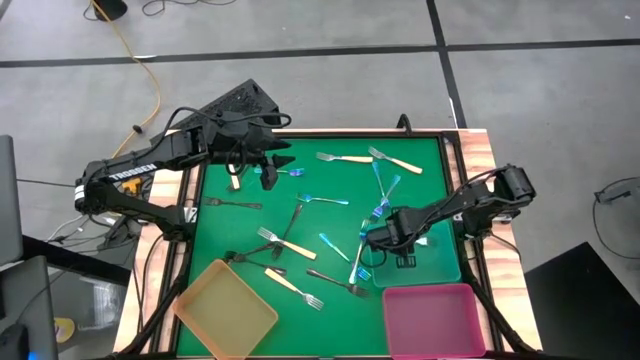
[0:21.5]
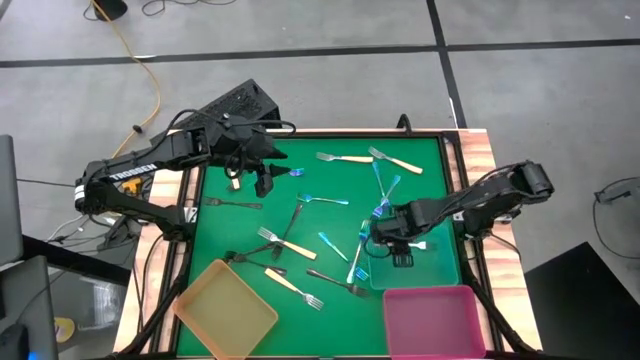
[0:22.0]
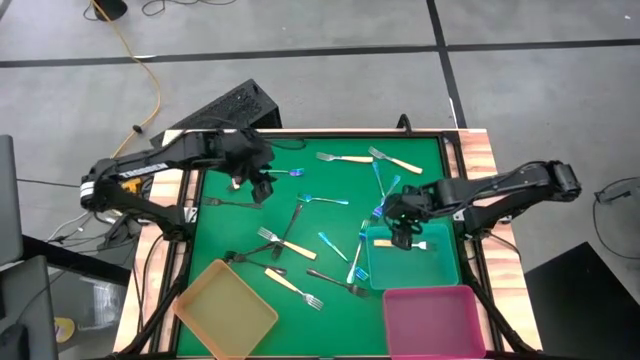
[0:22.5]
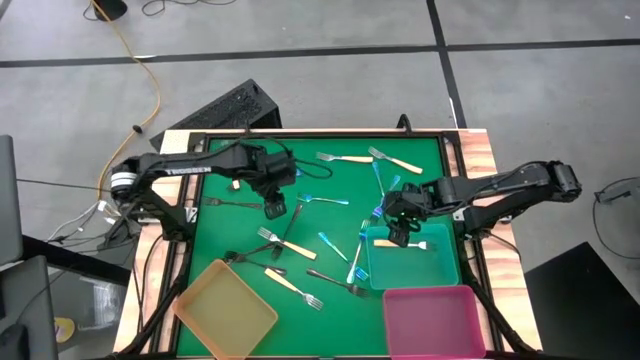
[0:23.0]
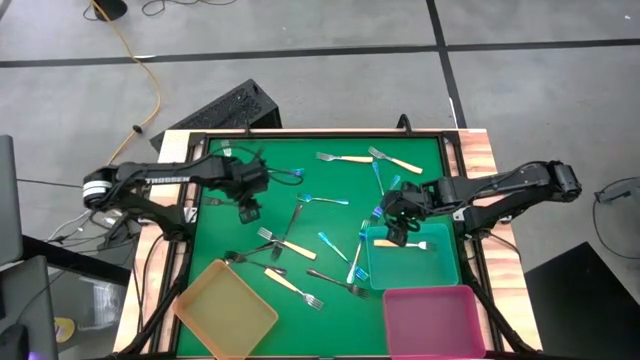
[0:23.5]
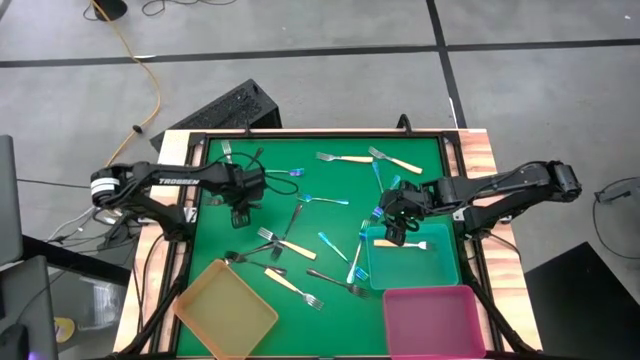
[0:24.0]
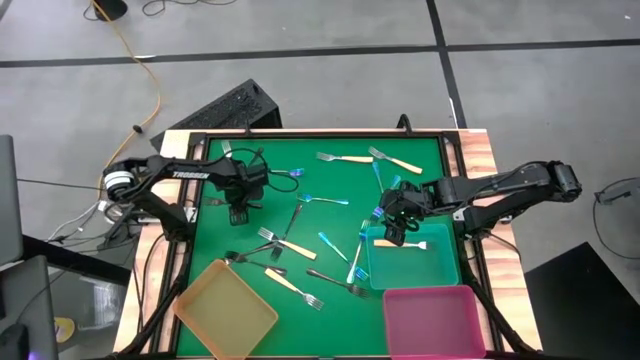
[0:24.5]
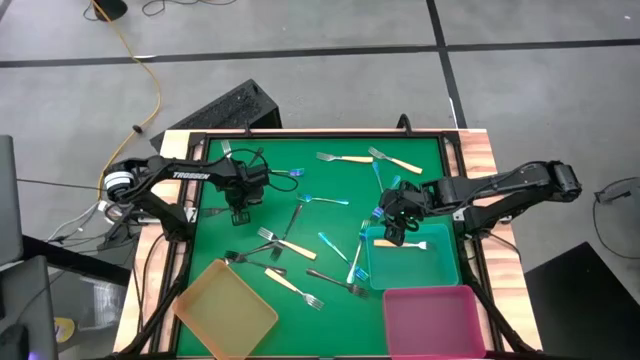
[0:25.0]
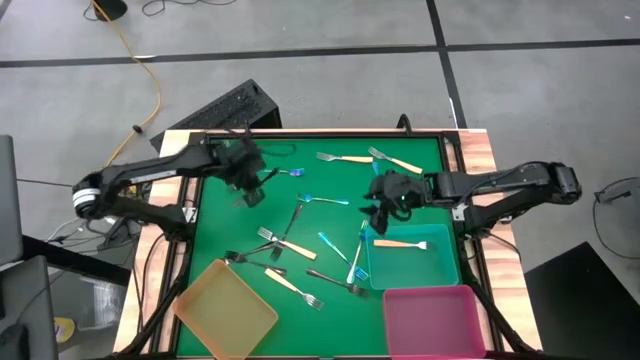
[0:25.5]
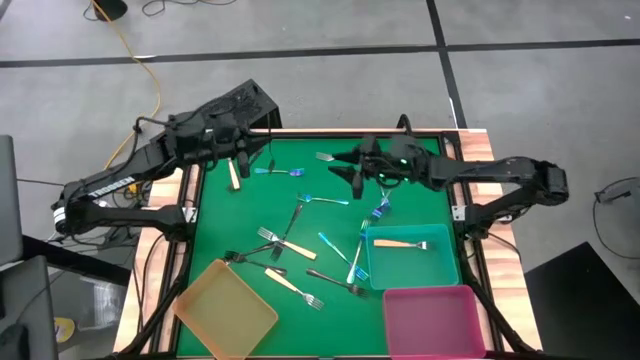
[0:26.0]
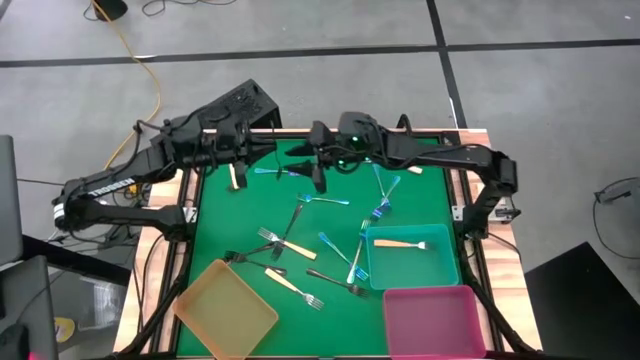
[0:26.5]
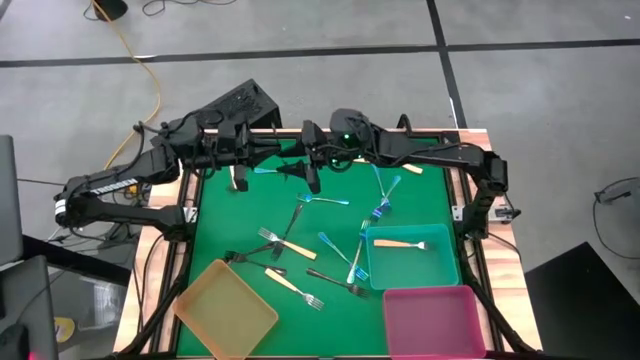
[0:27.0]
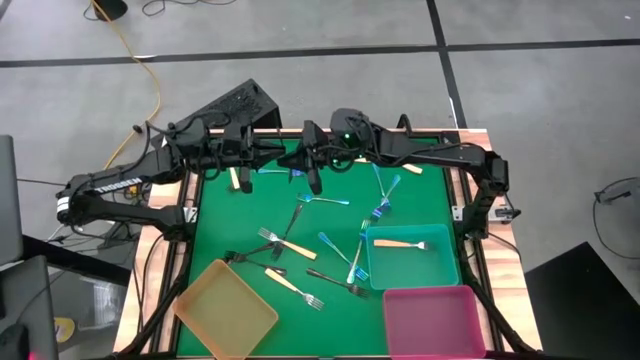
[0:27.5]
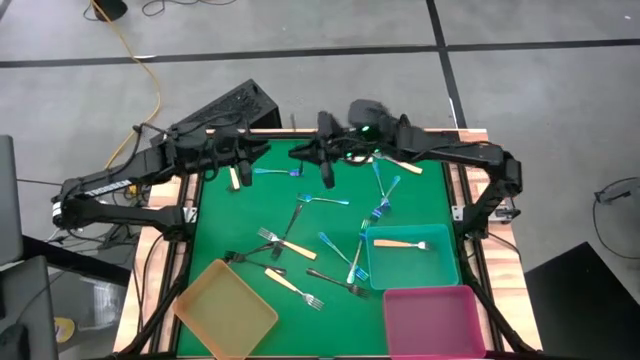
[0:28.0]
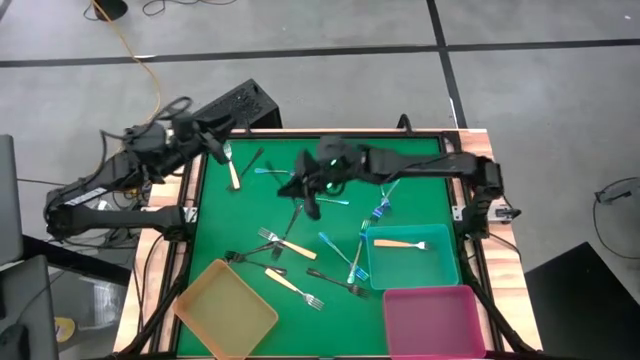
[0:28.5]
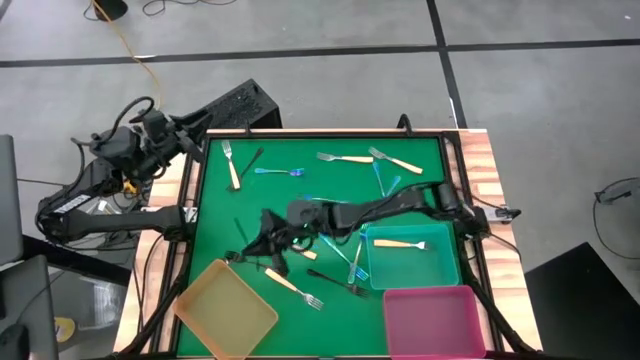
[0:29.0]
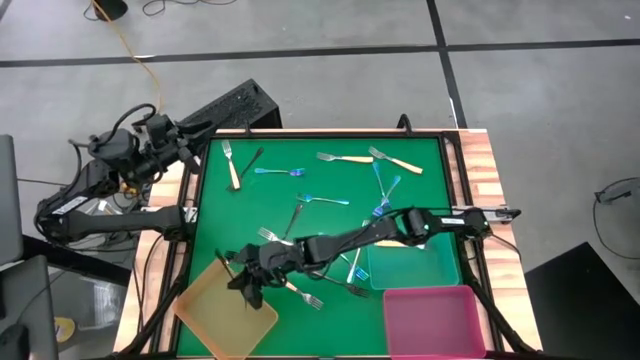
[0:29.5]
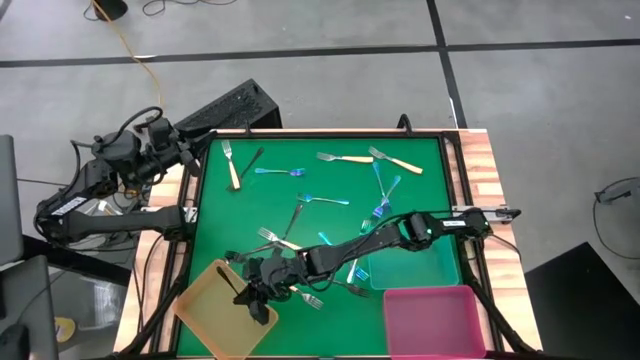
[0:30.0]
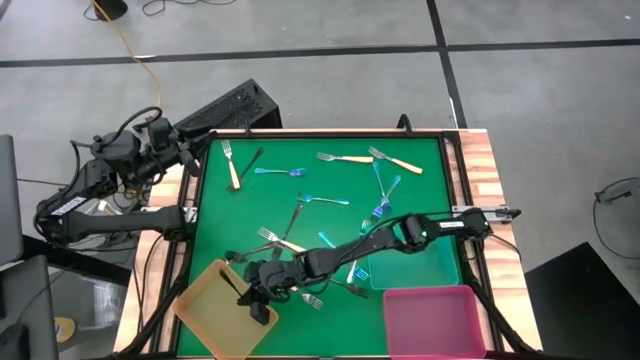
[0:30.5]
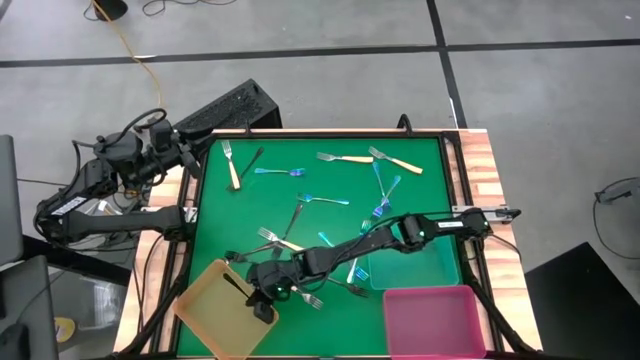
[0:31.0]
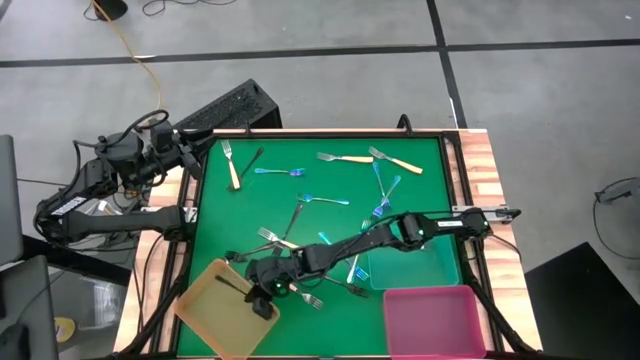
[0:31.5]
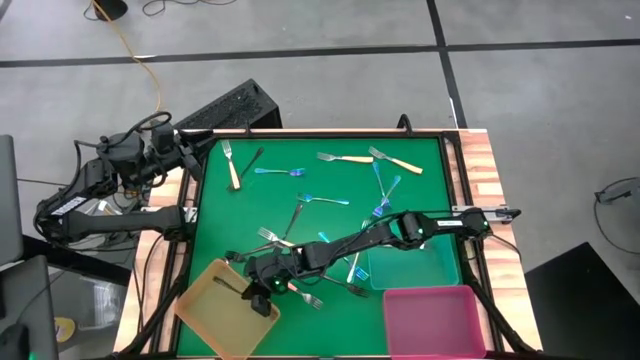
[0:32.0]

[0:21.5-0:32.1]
Task: Sort silverware by color (type)
Put the black fork into the orange bin

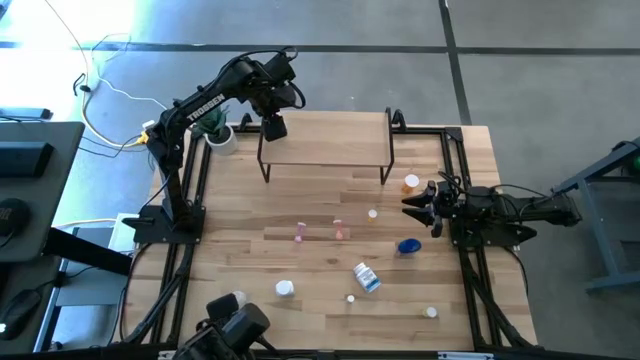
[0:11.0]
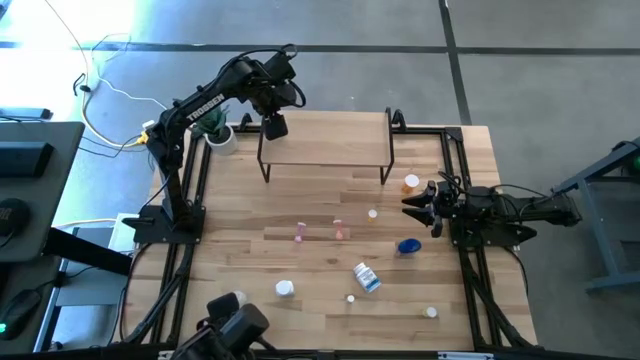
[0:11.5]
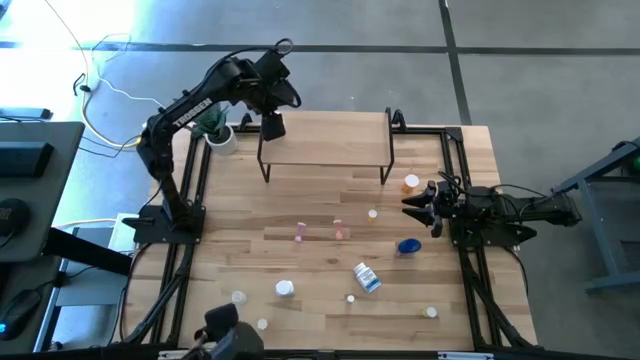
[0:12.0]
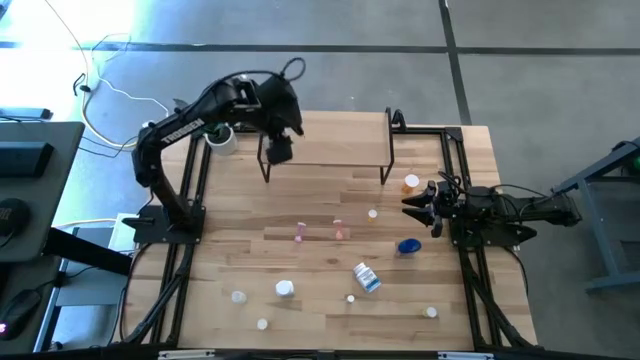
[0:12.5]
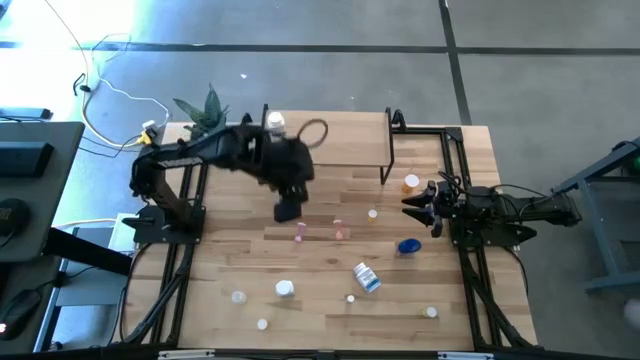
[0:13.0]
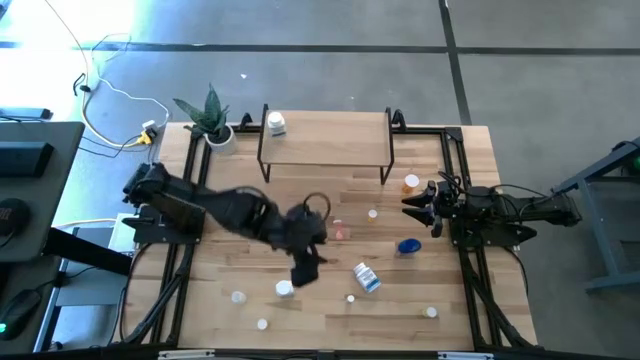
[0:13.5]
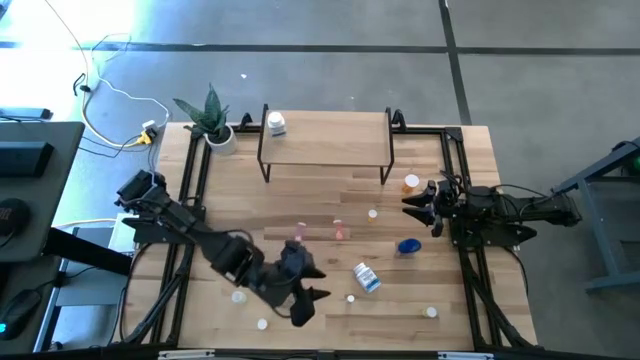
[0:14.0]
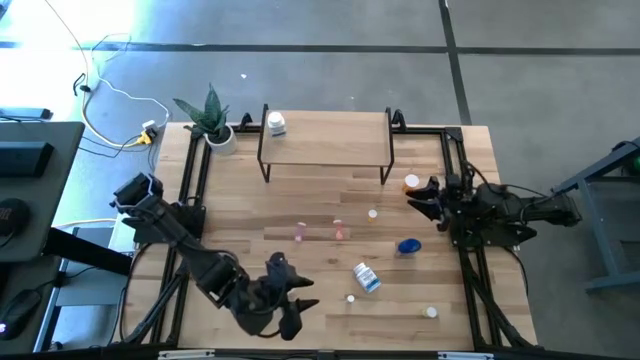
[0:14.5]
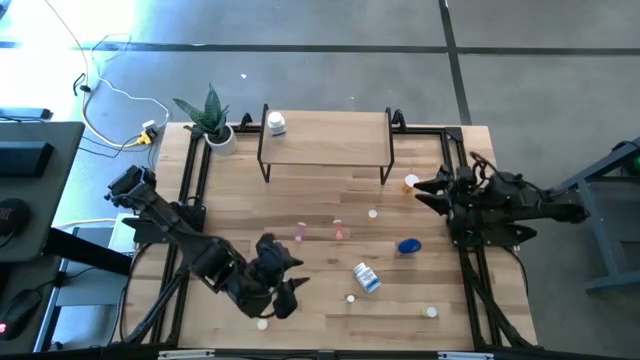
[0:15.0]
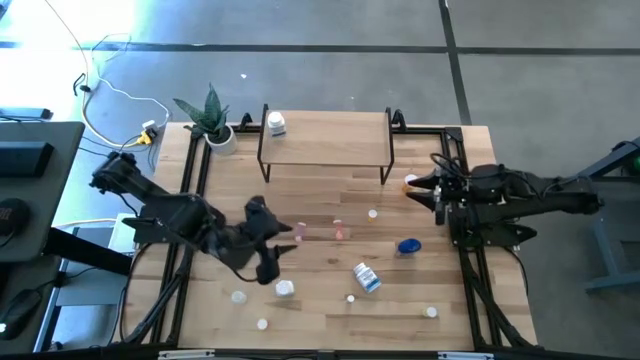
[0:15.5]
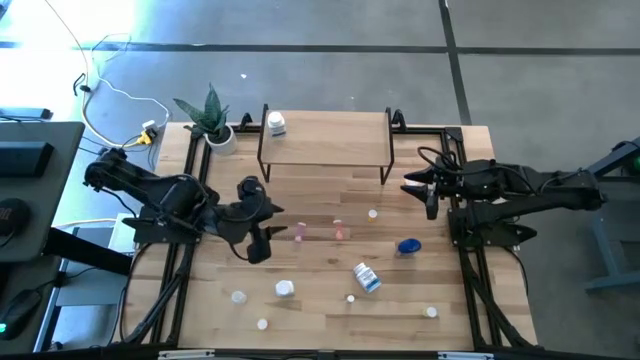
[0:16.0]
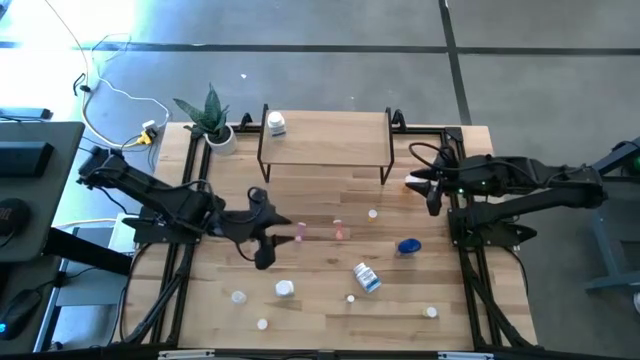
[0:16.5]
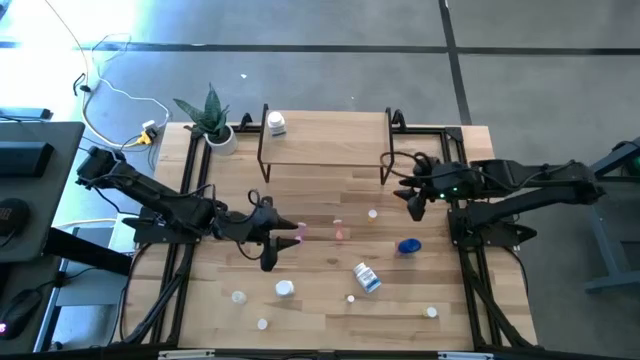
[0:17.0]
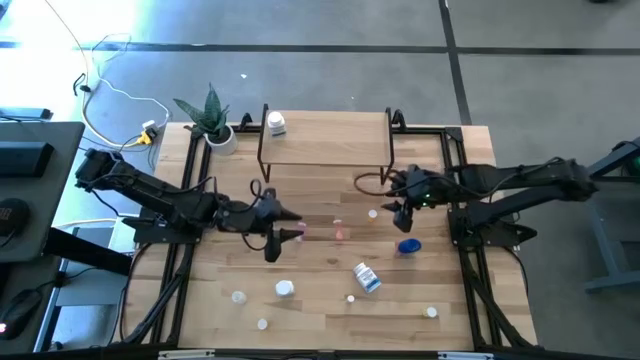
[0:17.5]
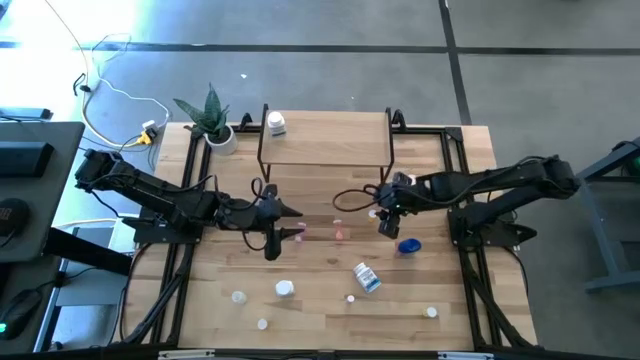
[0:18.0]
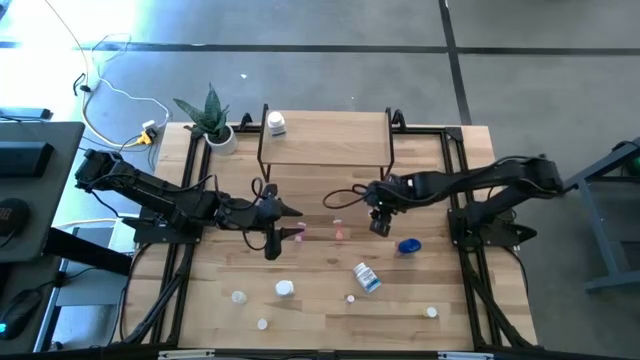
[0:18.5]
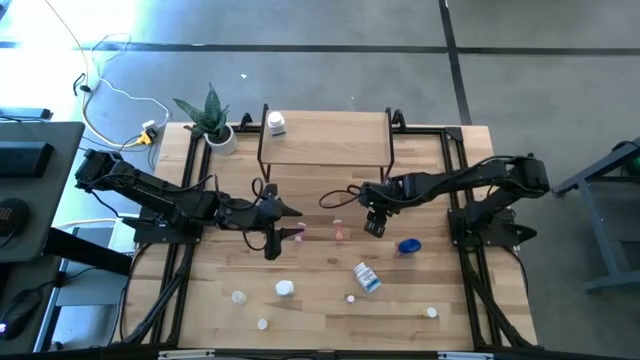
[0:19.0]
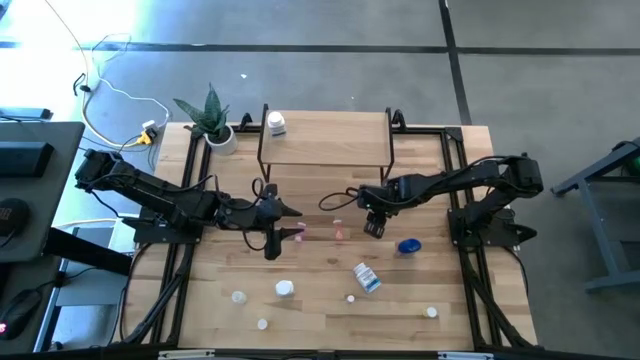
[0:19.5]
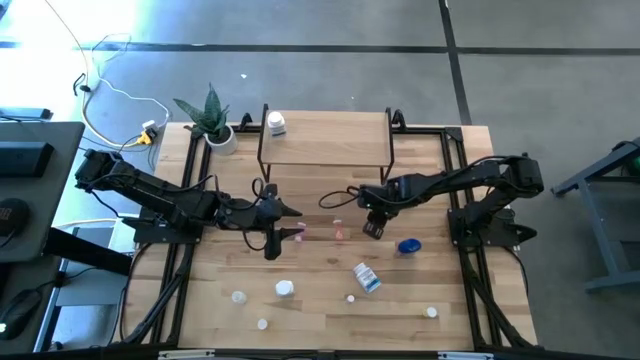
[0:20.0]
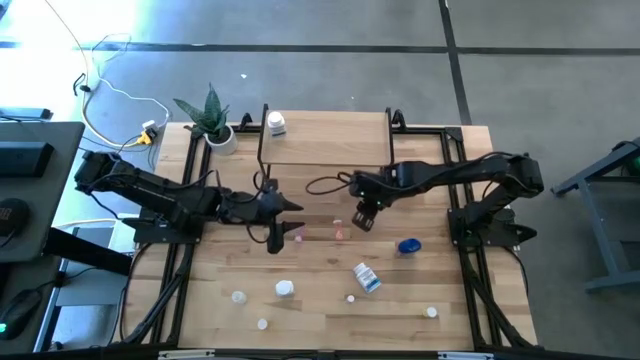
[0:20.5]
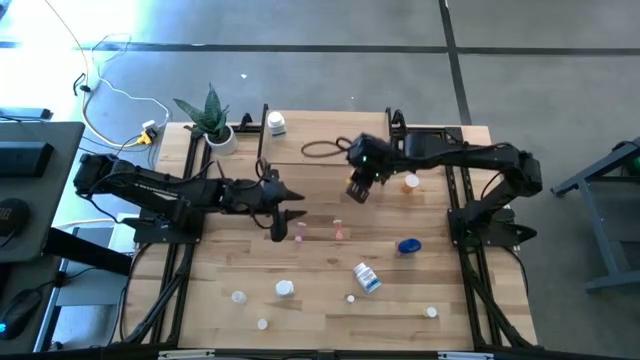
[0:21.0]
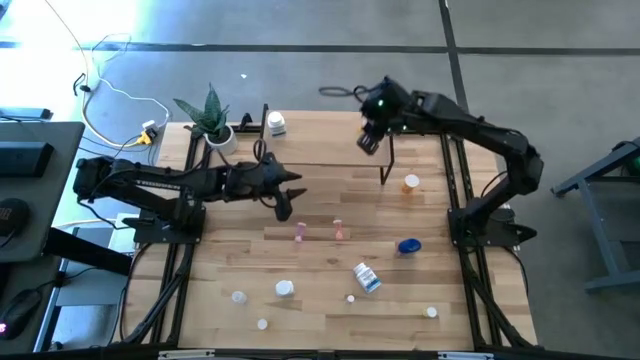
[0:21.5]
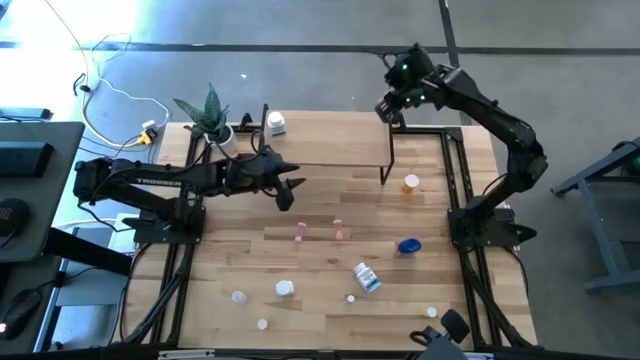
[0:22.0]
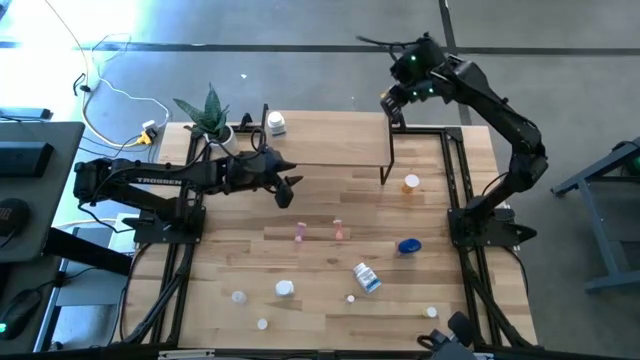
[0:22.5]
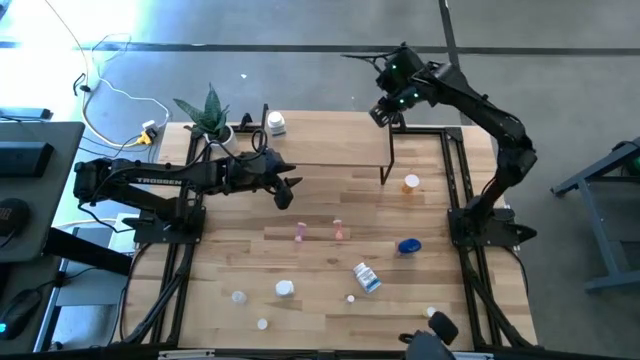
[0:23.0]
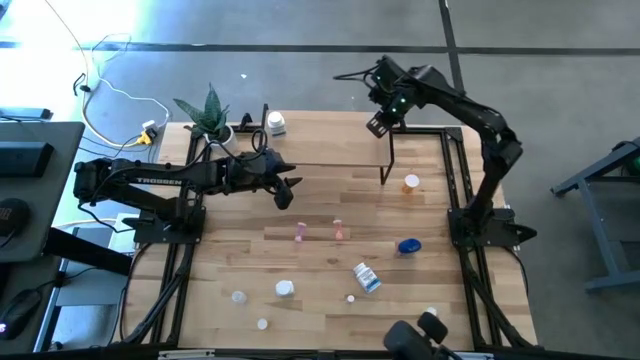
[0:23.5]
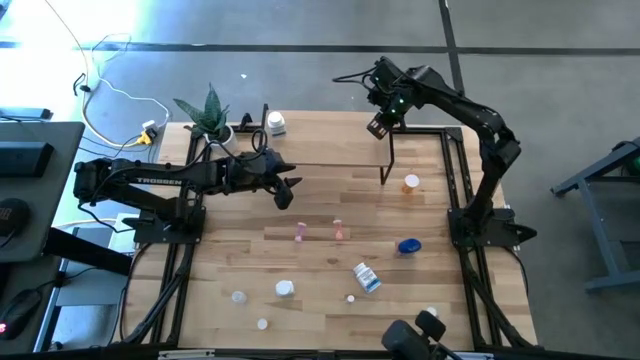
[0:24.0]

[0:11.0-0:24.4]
Task: Pick and place medicine bottles onto shelf by color
Put the center orange pill bottle on the shelf
